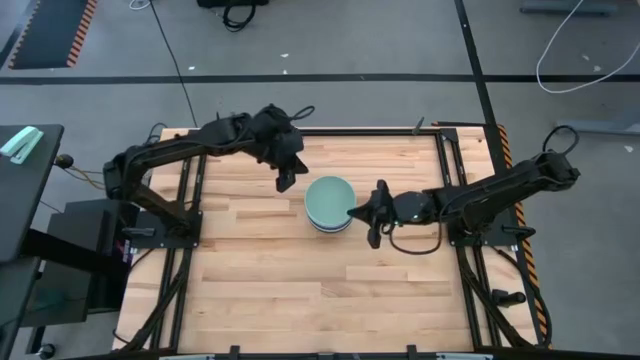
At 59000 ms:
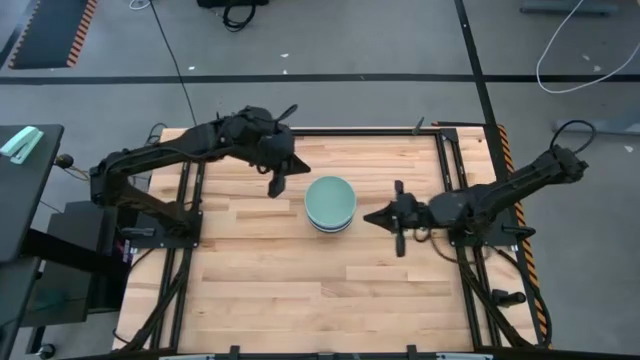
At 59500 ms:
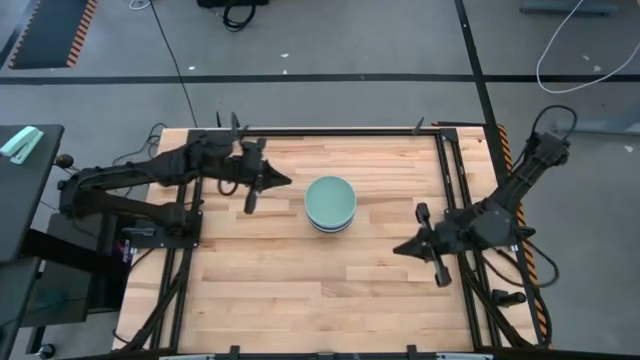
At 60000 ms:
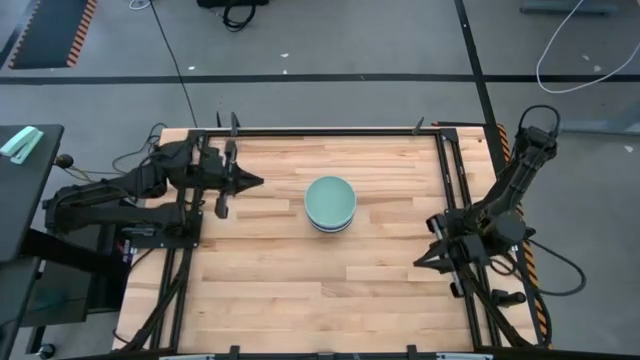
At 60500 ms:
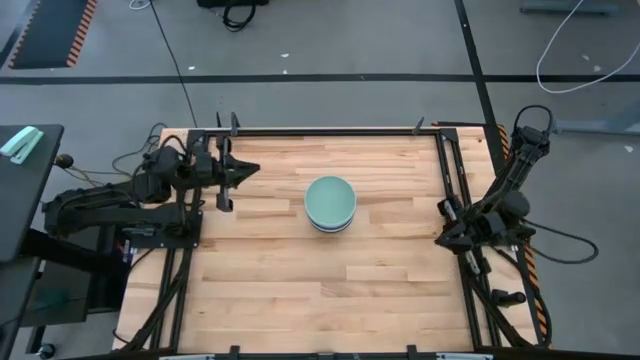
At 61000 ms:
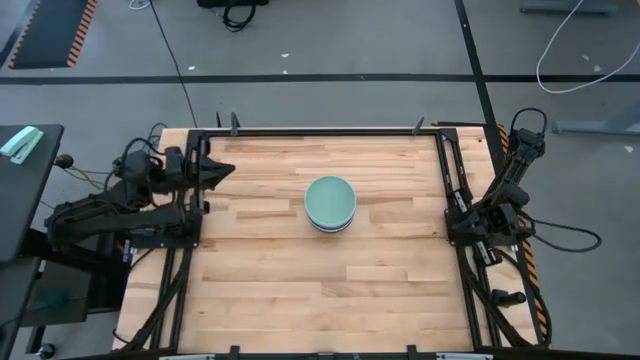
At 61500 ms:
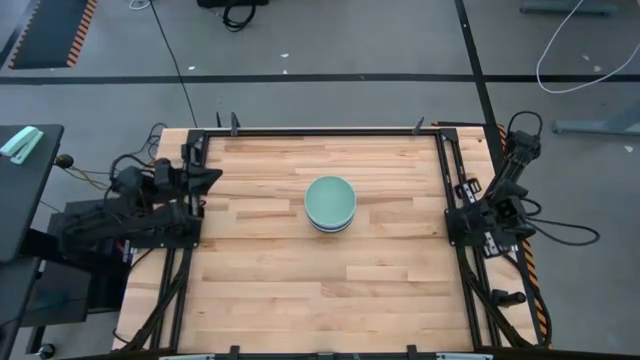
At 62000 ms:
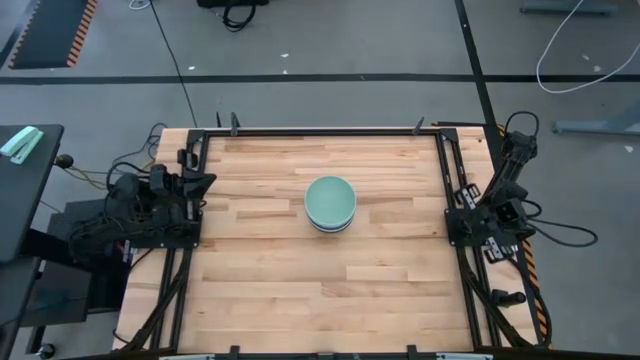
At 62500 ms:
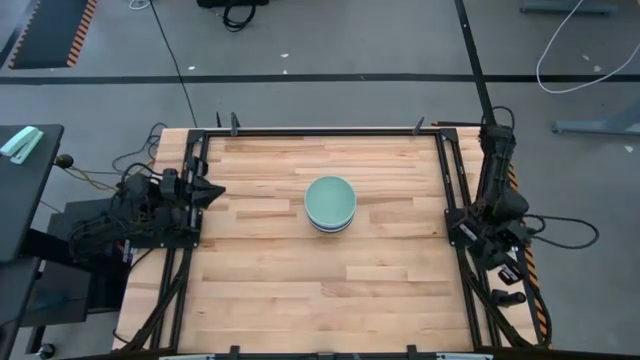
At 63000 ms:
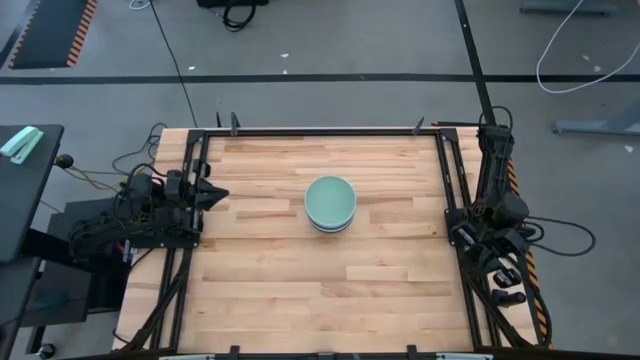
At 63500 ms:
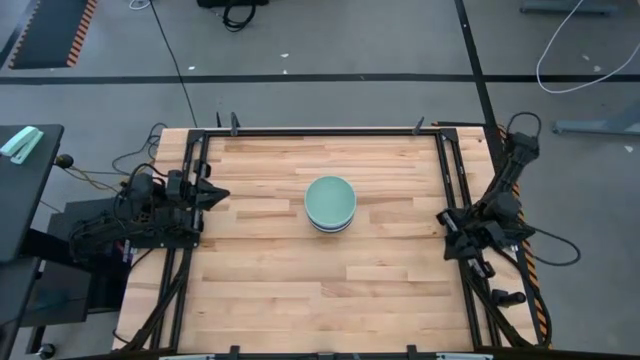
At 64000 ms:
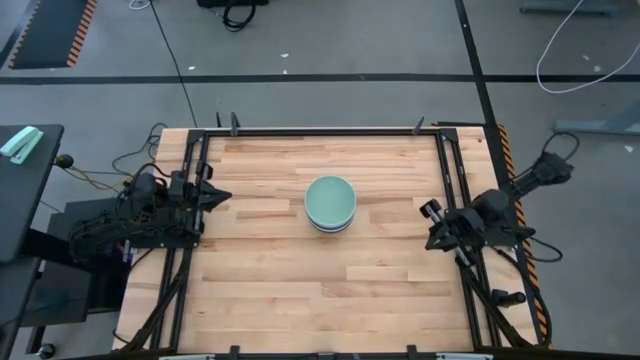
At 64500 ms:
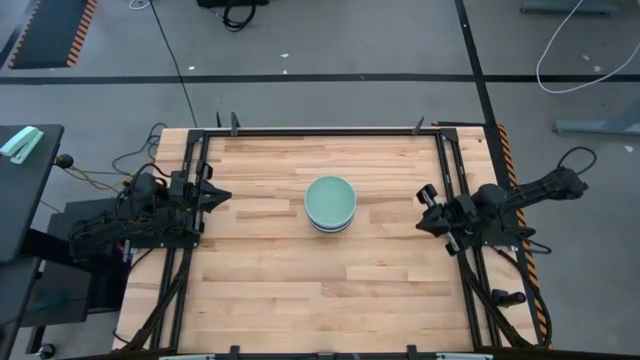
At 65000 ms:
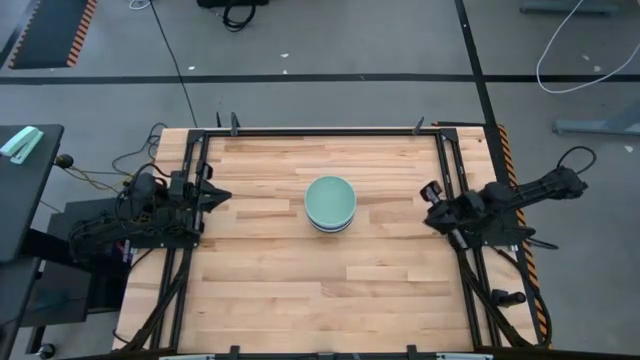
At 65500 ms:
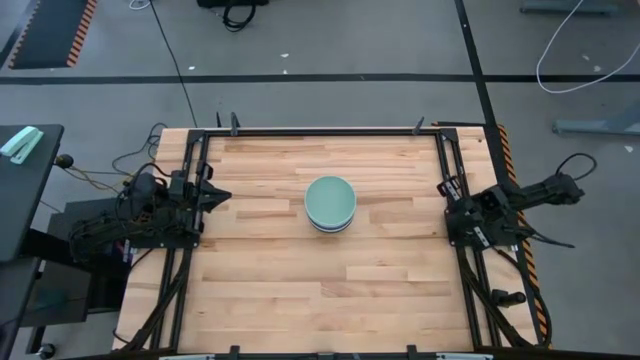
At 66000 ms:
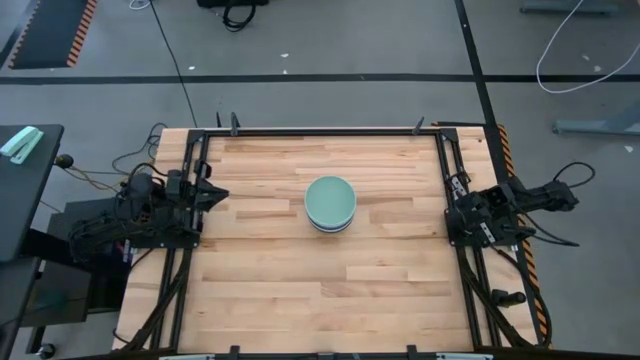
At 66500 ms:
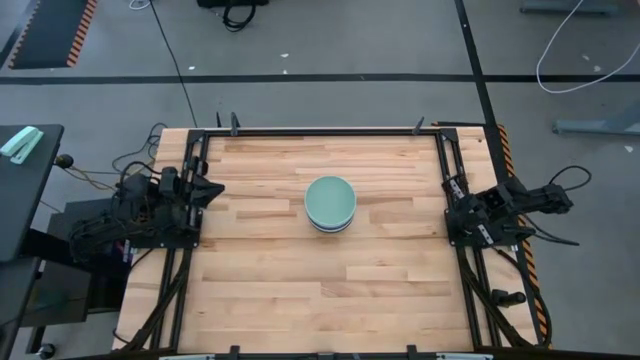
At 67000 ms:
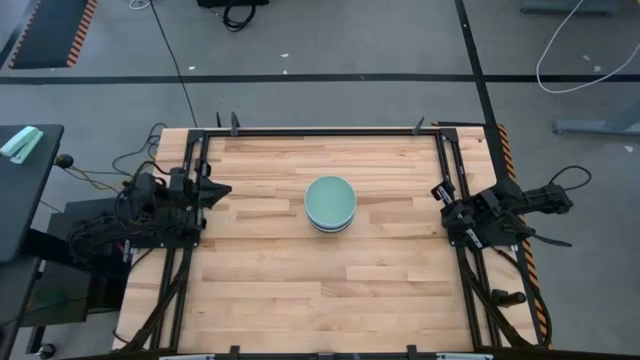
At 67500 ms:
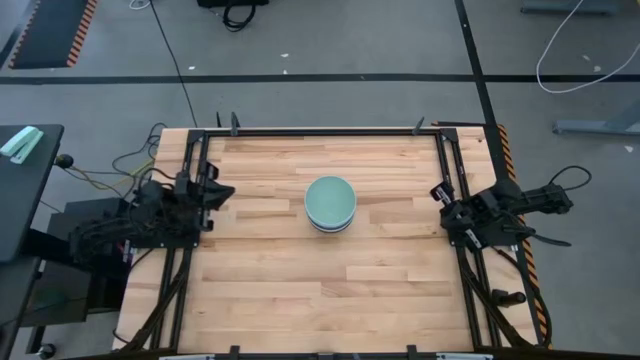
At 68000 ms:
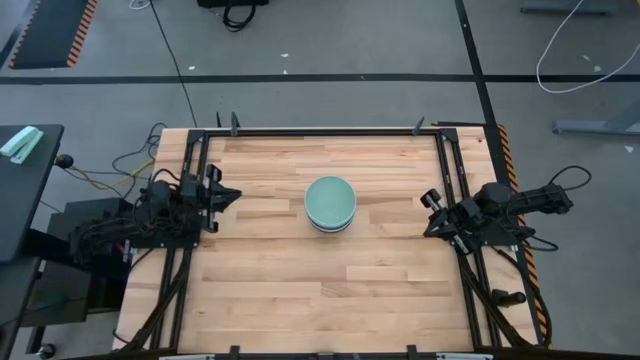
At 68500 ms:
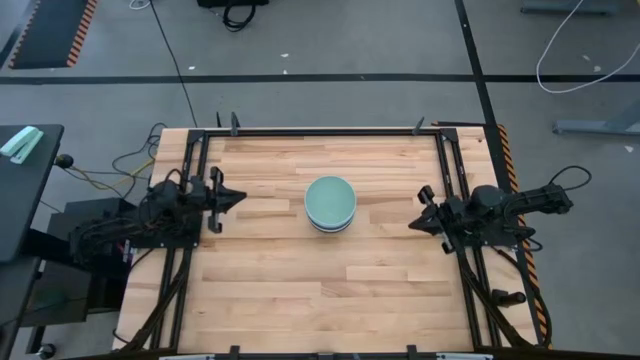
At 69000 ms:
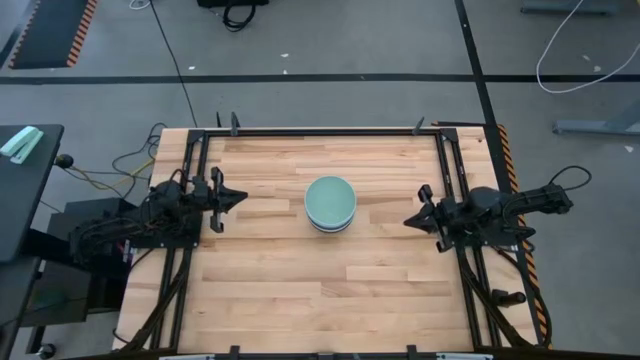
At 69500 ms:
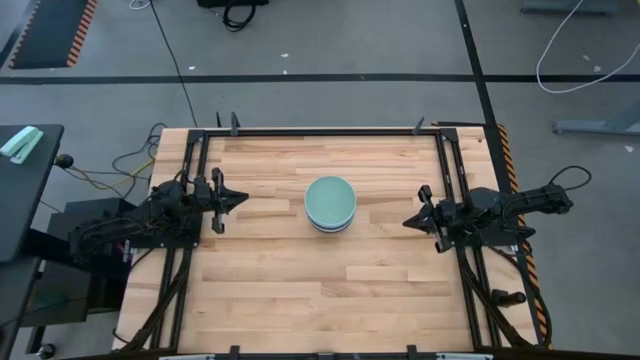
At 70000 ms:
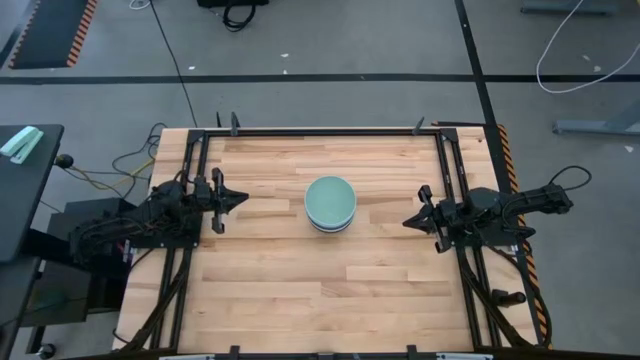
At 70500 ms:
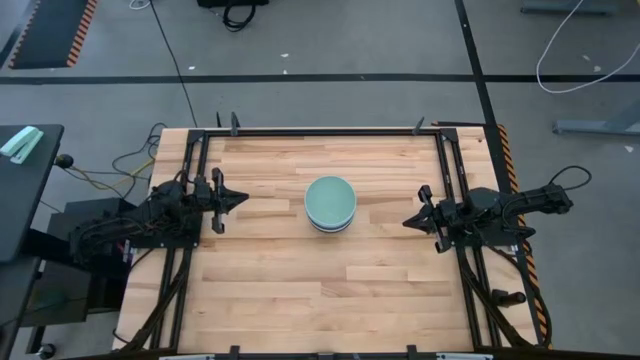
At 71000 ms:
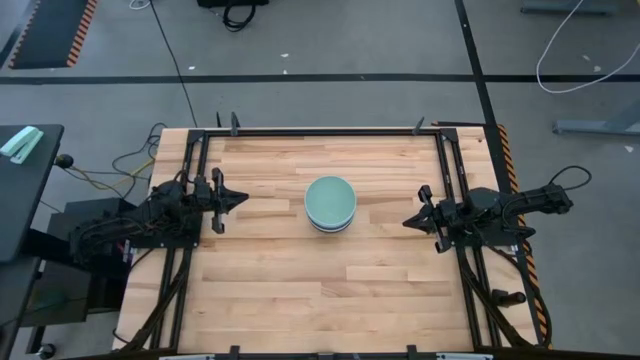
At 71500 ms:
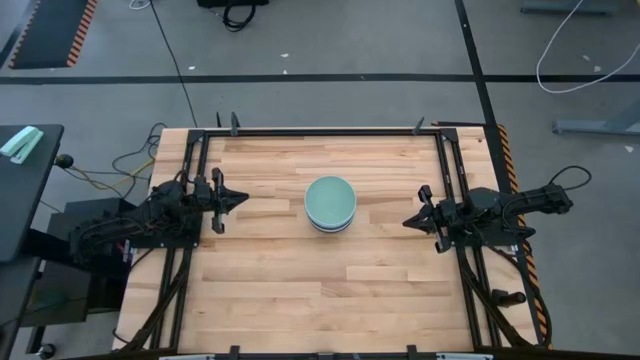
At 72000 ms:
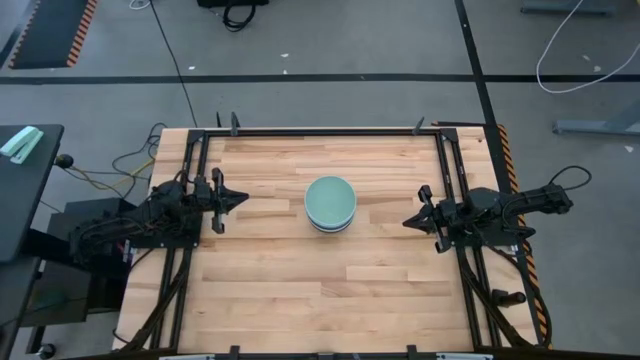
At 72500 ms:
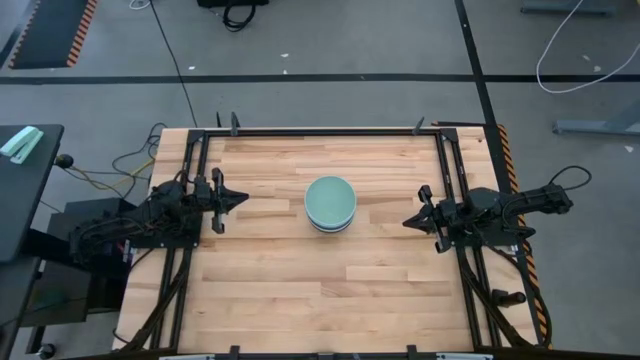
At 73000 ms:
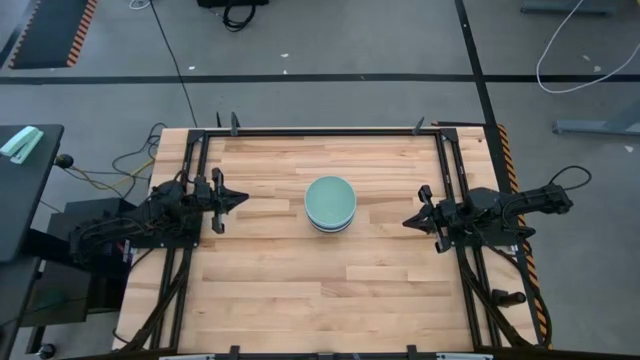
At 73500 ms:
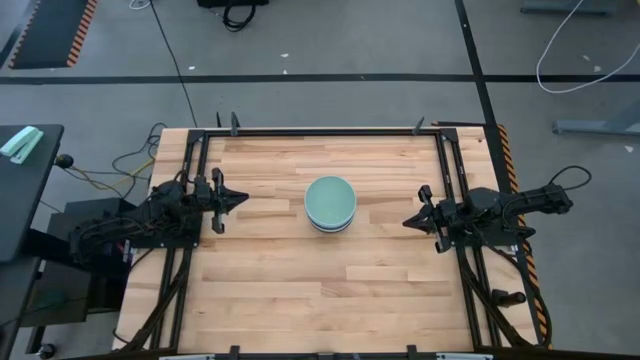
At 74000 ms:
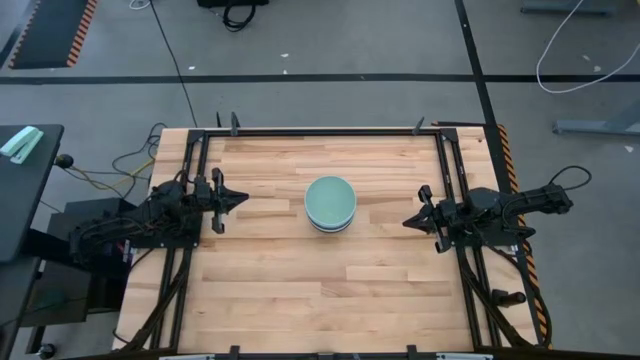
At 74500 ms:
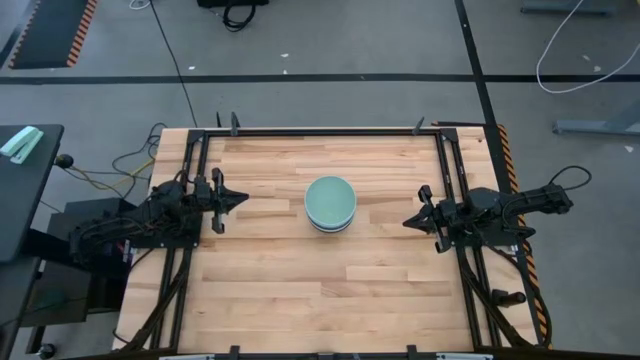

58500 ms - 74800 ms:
Task: Nest bowls inside each other
Return to Home Position

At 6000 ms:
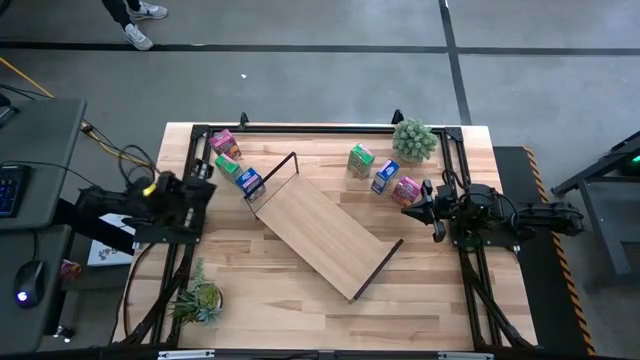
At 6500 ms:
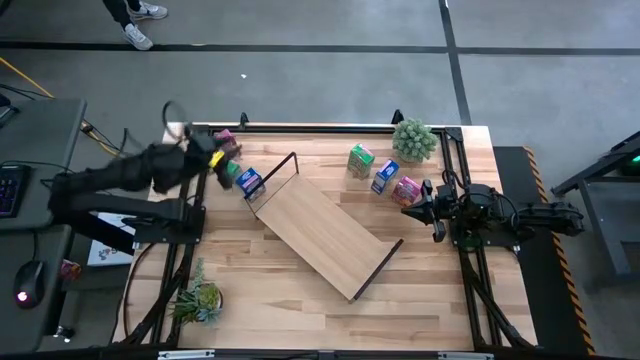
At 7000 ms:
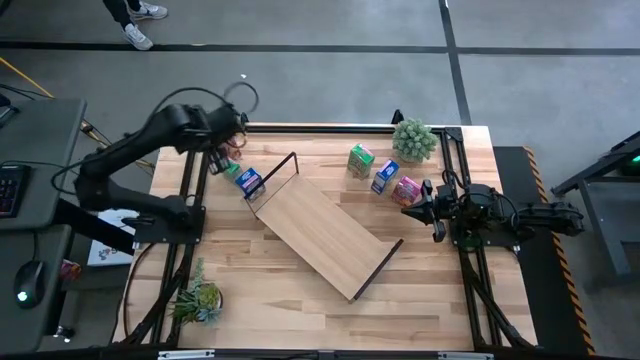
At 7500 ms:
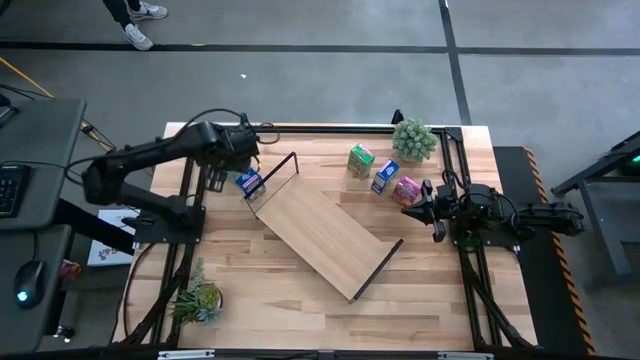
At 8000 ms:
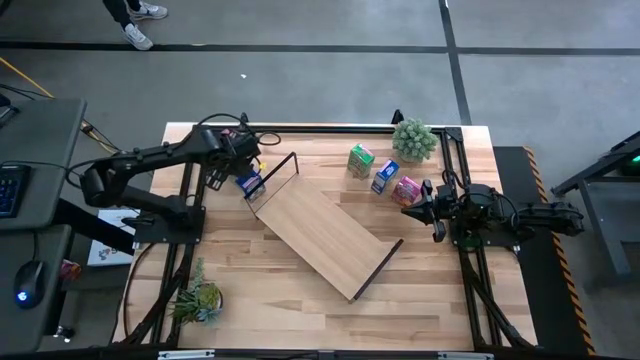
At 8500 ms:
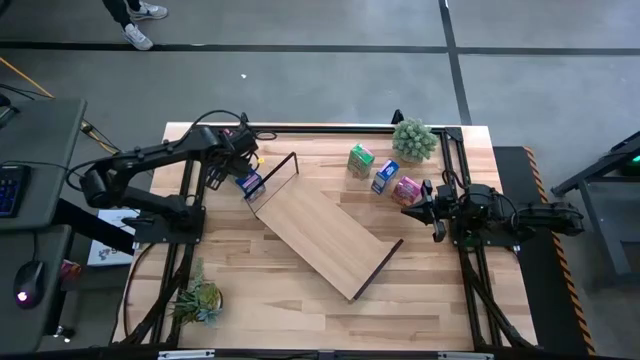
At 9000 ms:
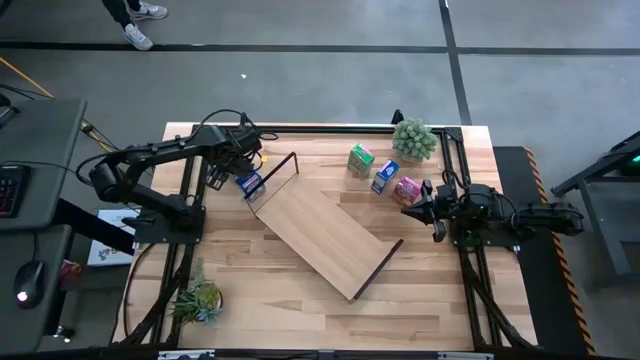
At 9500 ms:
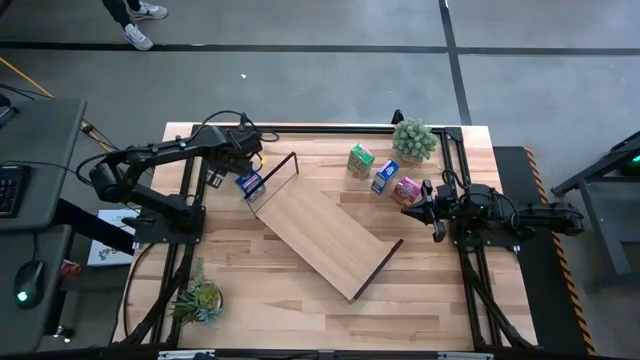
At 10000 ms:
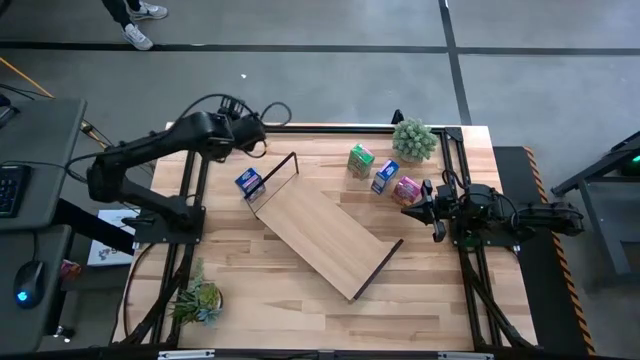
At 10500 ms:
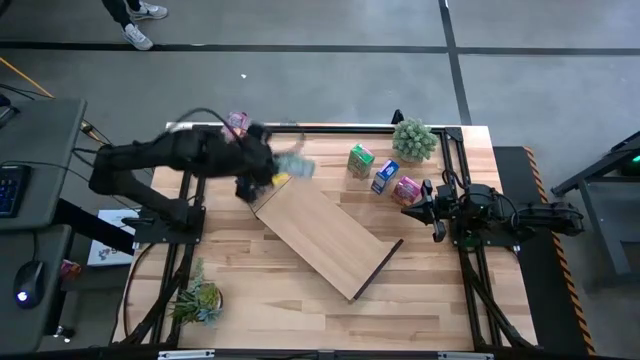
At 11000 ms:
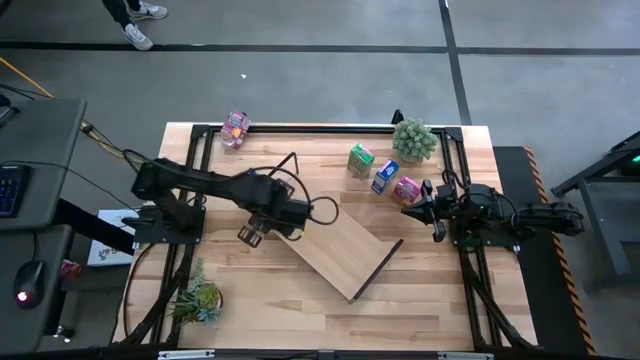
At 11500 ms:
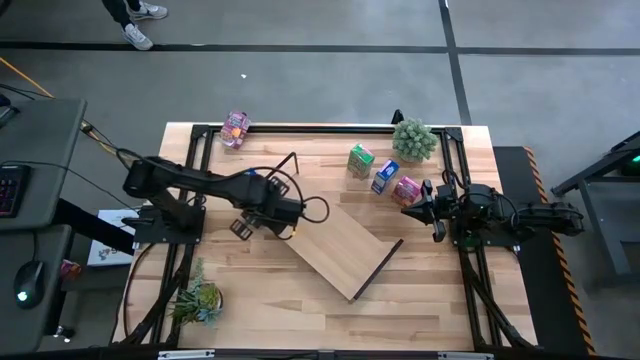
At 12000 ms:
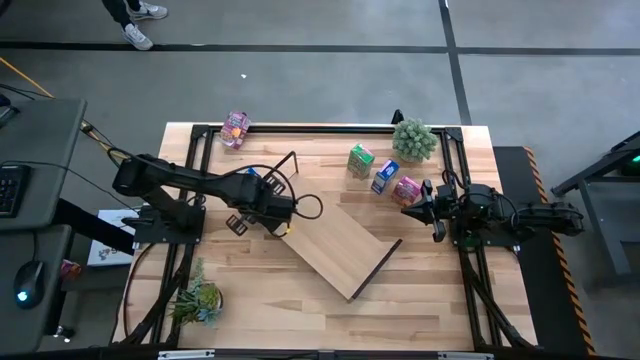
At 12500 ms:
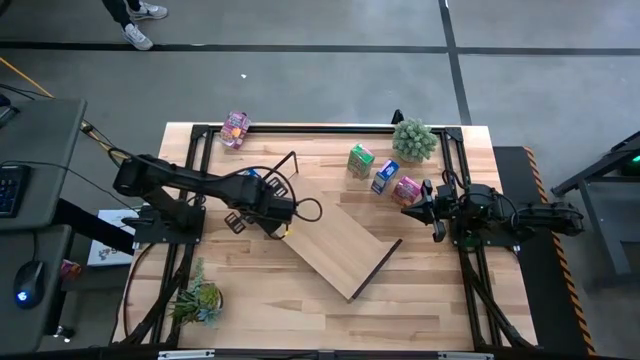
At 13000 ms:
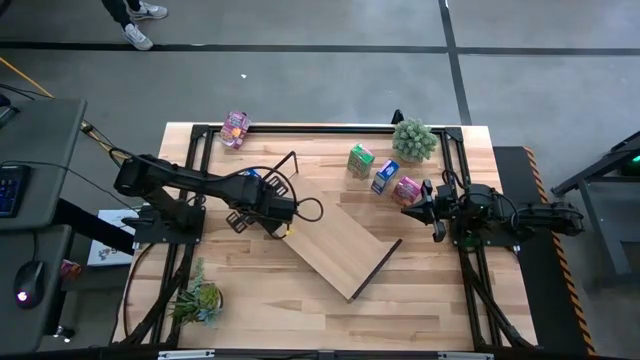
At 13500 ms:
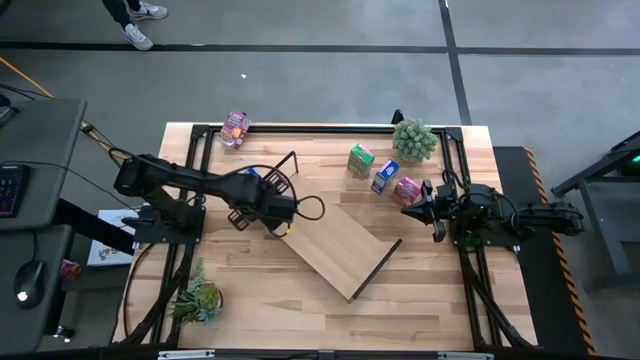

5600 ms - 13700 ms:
Task: Stack cereal on shelf
Put the top left green cereal box on the shelf
